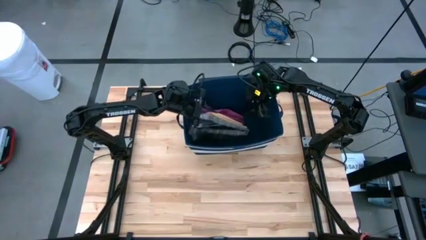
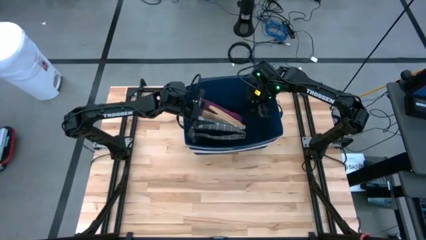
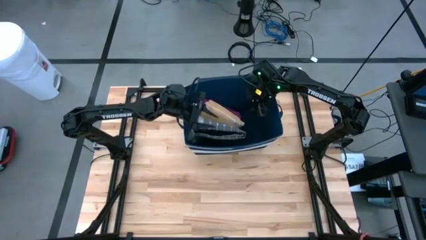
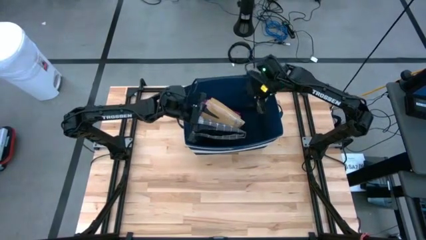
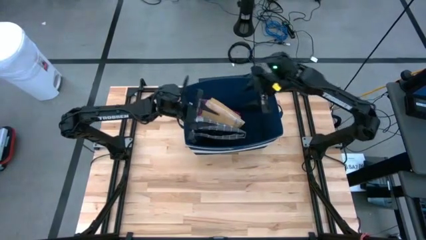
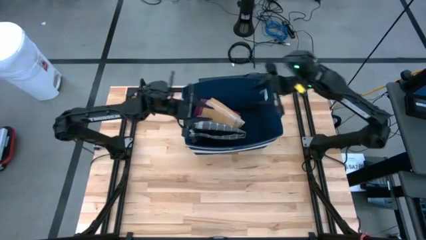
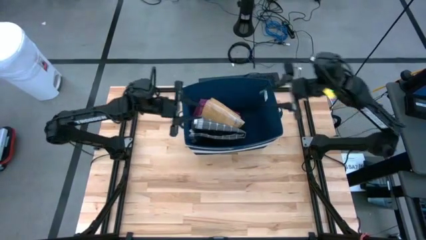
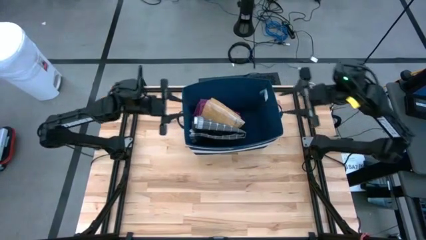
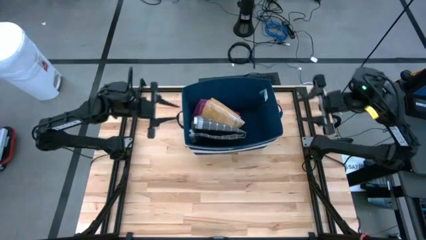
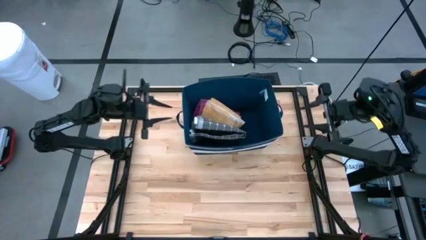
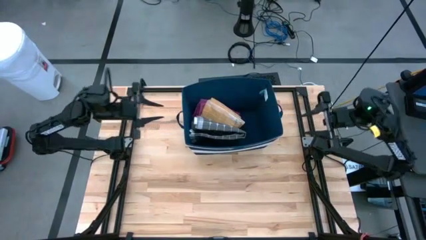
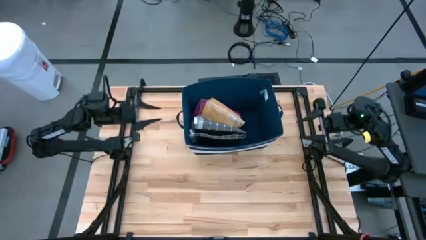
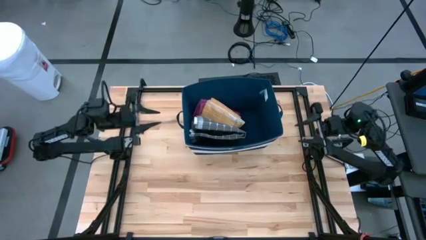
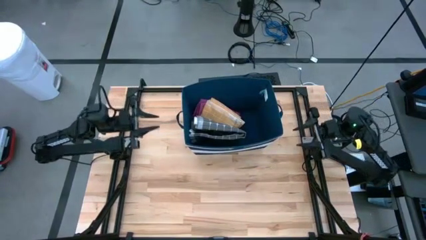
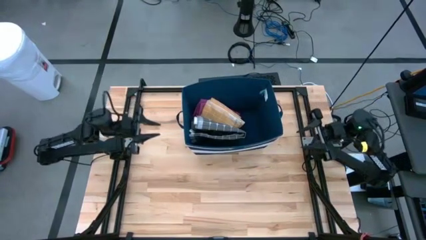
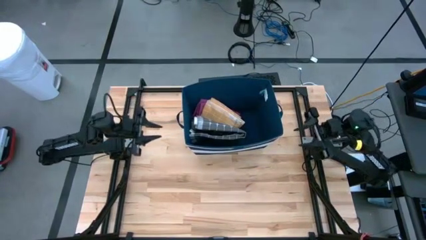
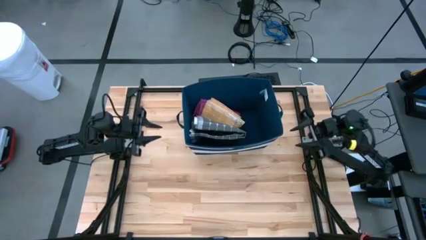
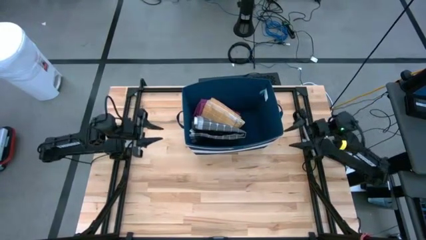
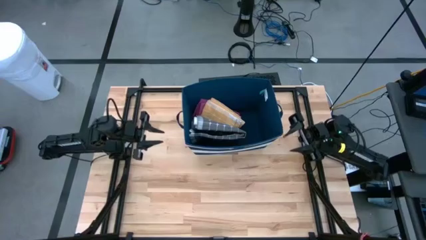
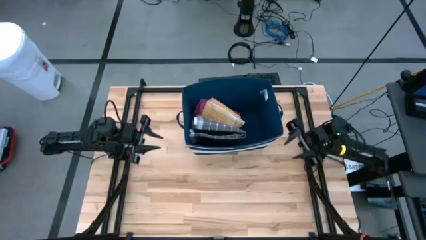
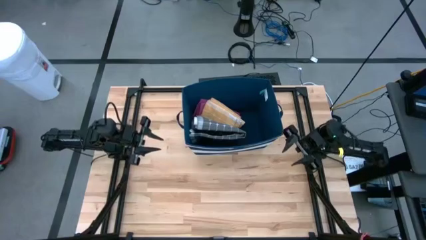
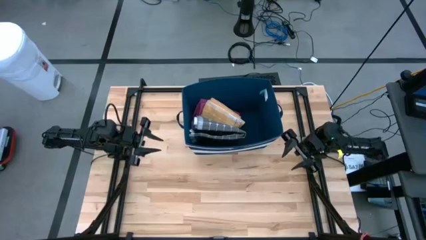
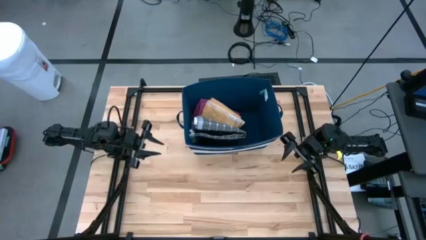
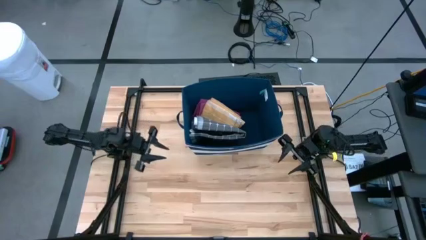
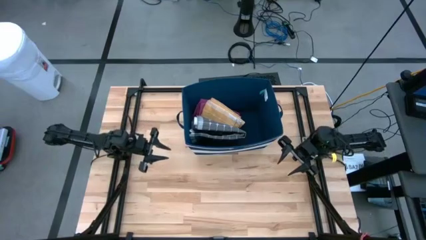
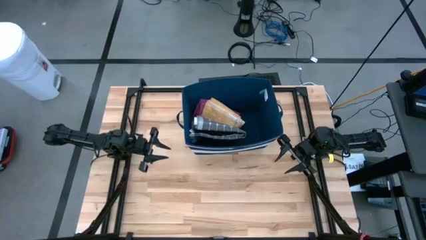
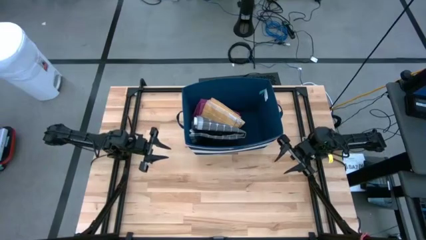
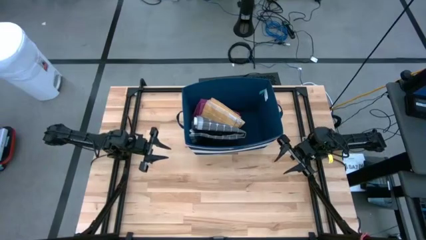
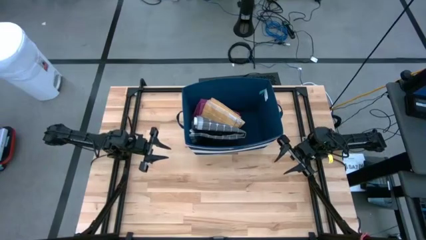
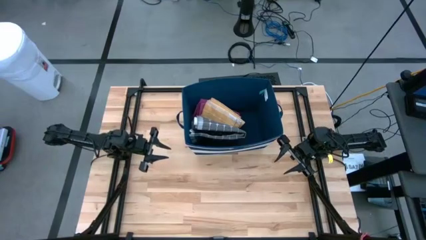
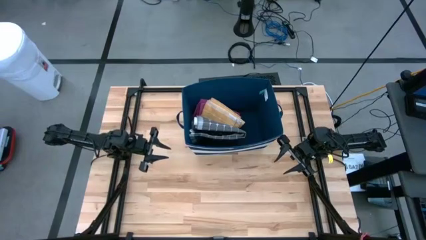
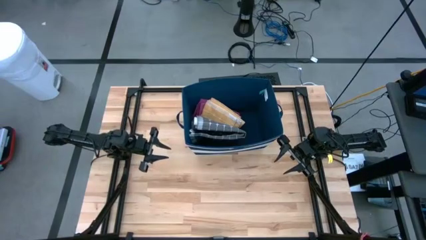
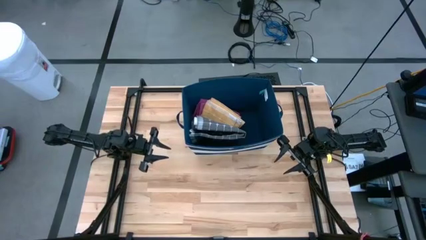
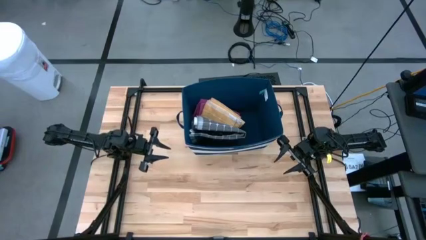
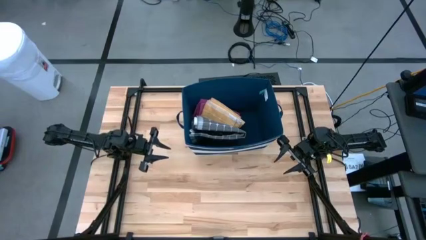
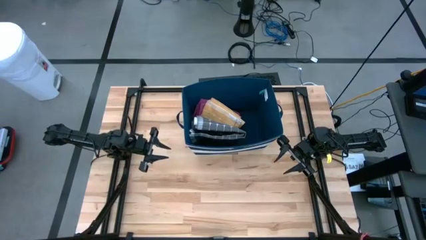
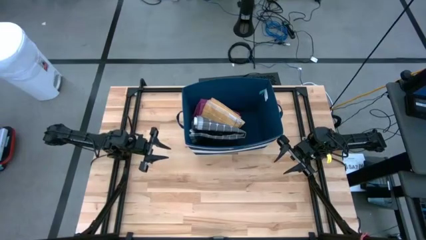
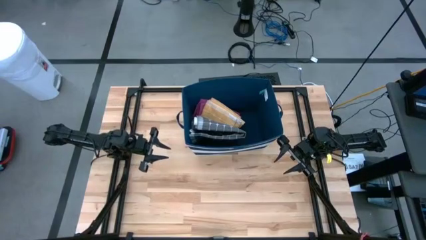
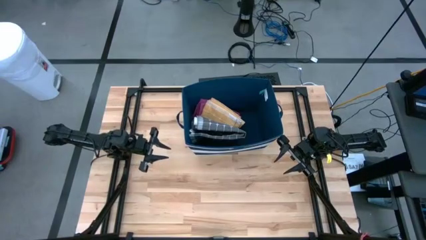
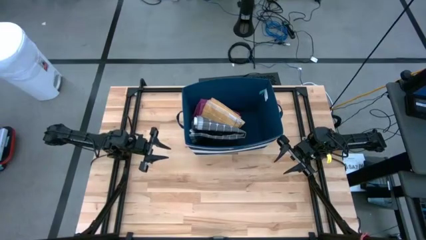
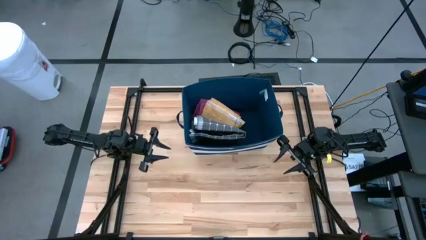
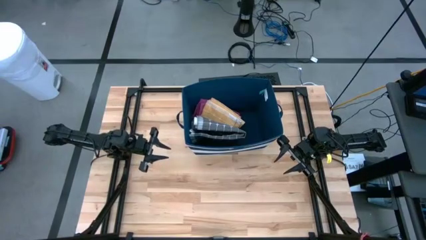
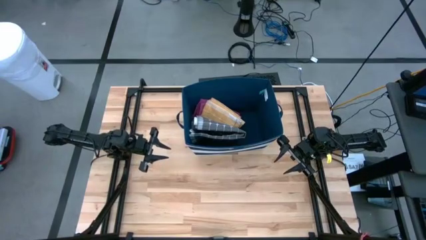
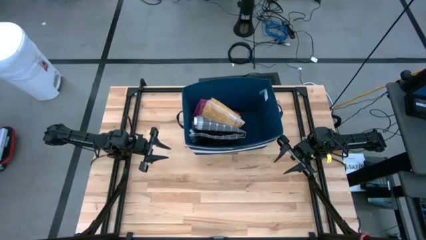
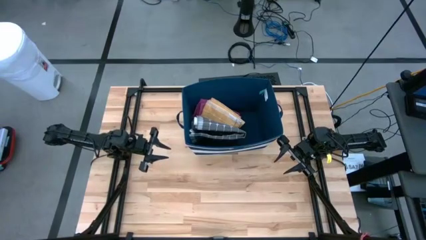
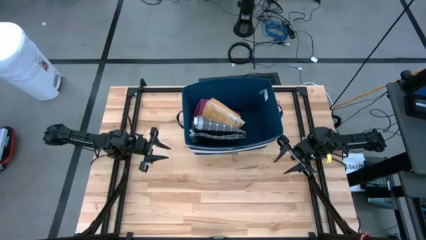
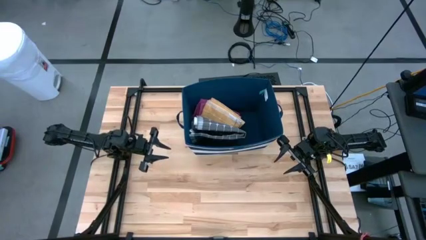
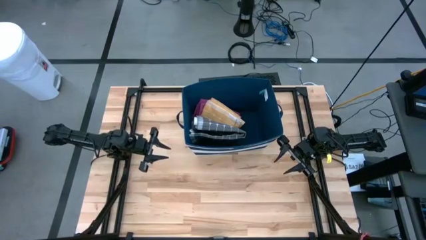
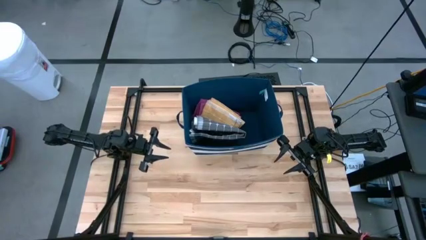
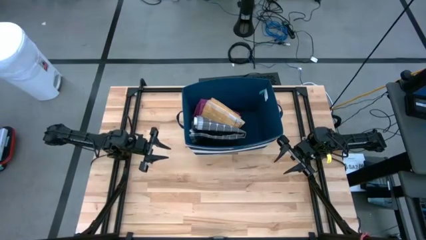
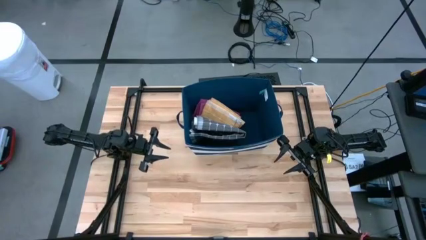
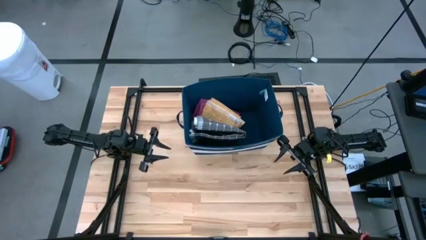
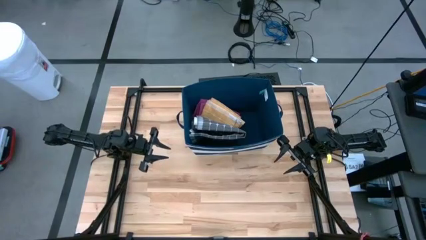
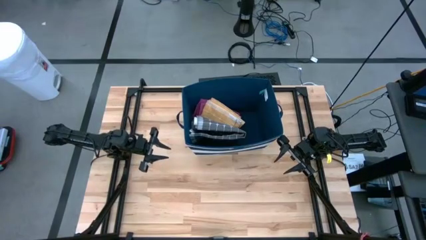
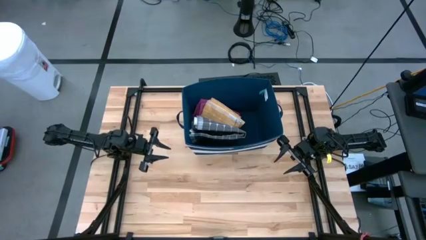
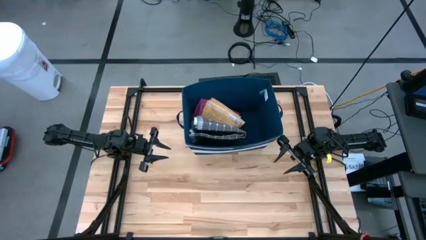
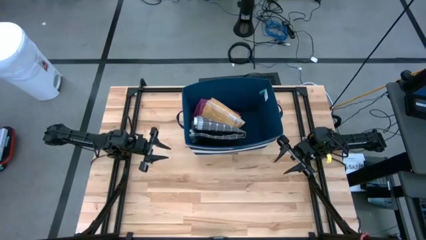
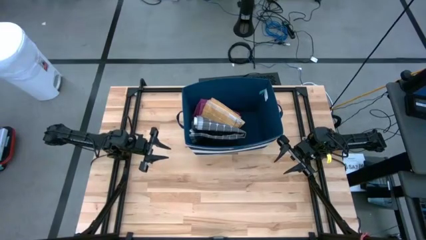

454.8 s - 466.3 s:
Task: Fold towel
Return to Home Position

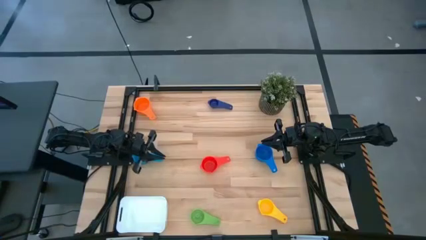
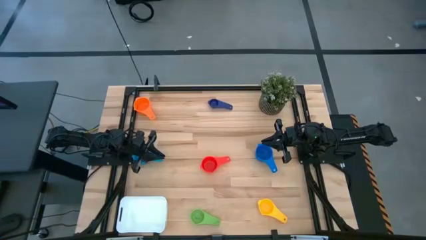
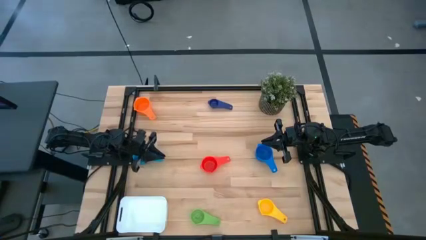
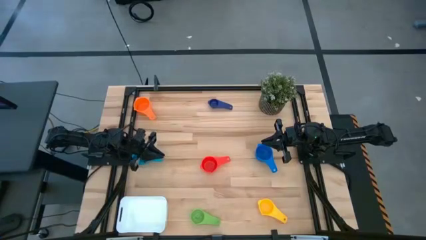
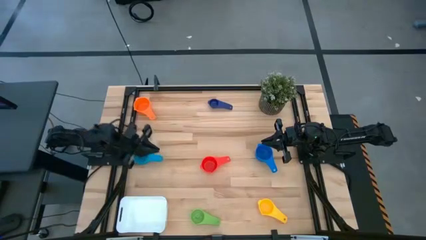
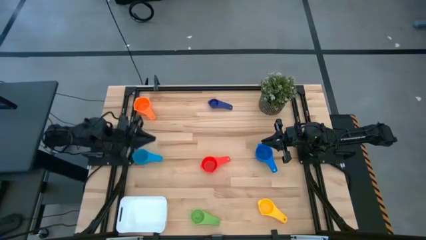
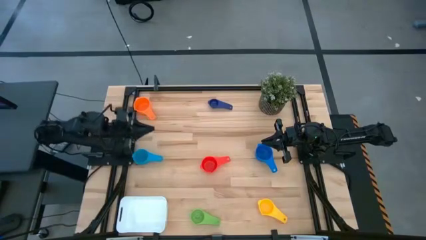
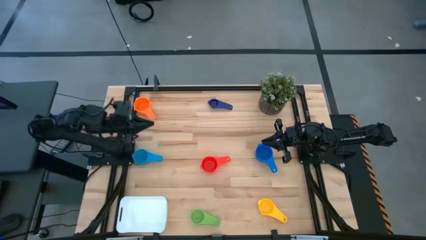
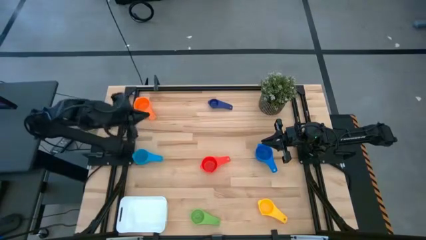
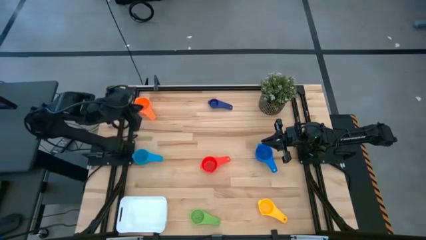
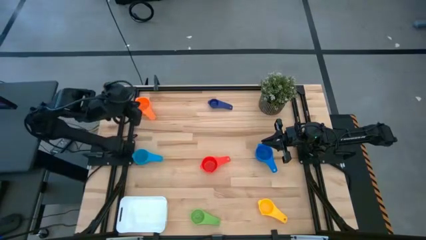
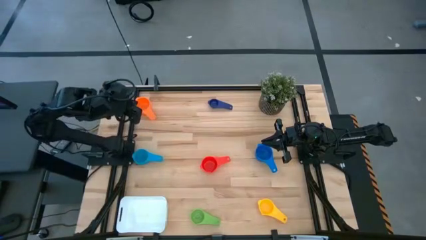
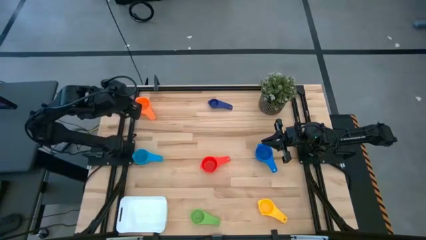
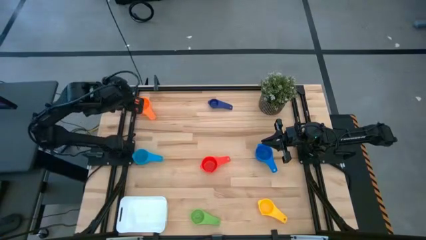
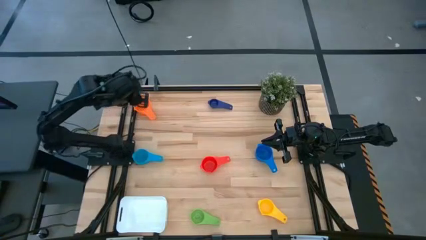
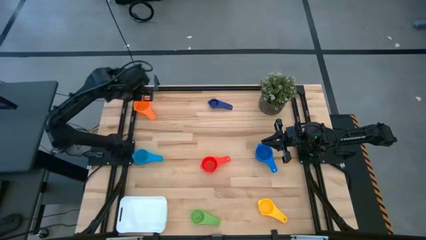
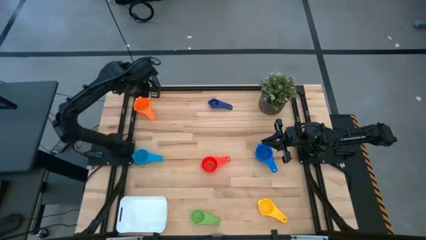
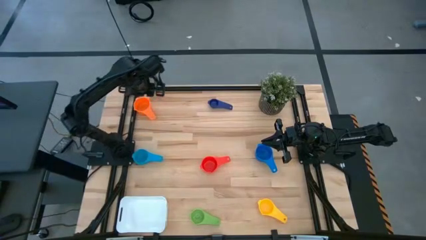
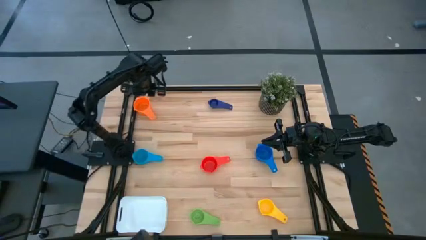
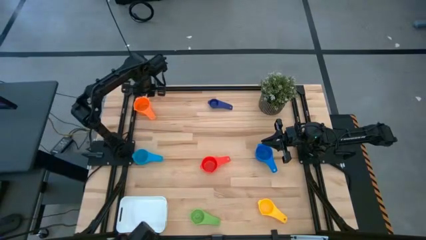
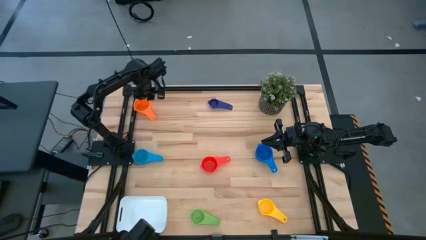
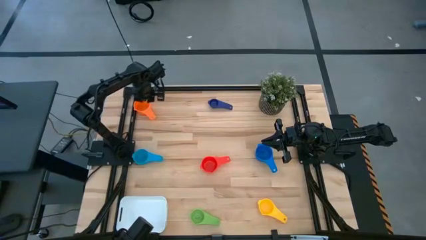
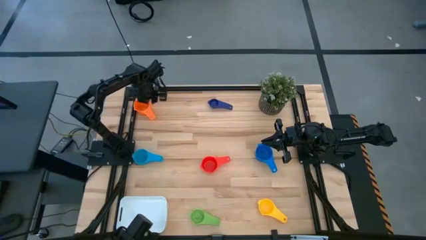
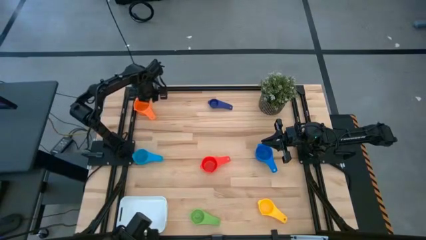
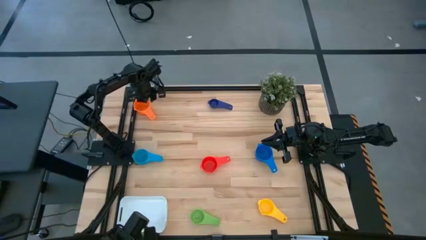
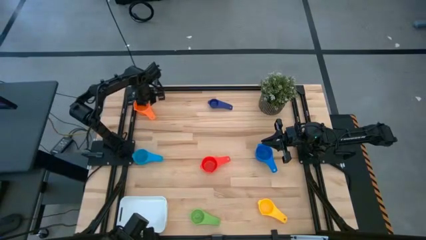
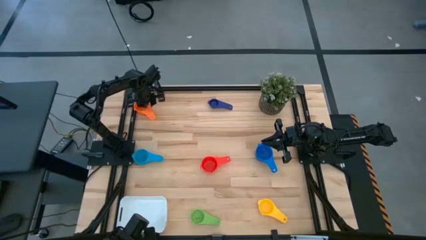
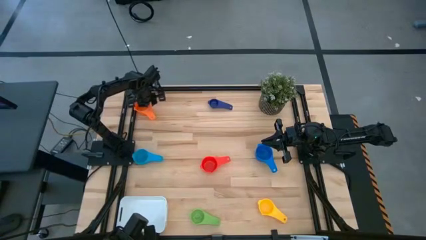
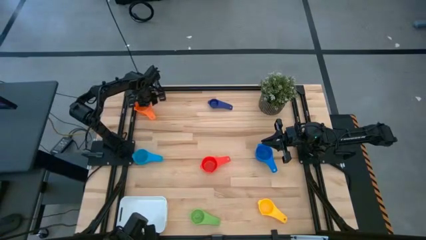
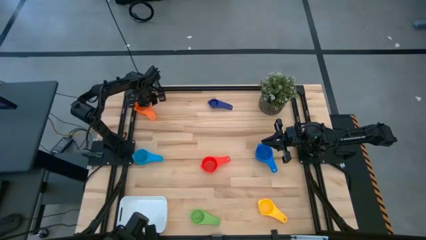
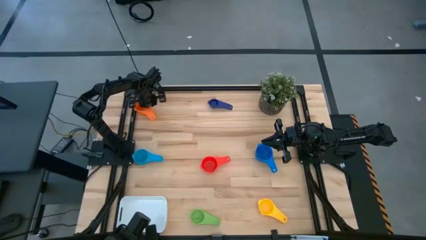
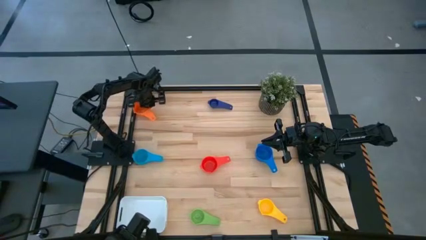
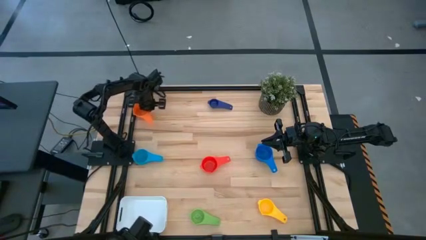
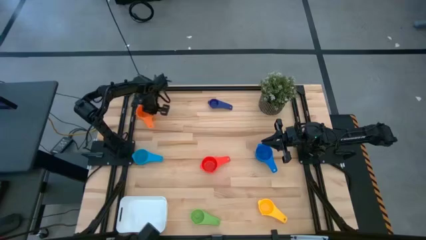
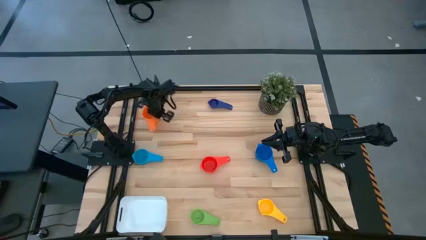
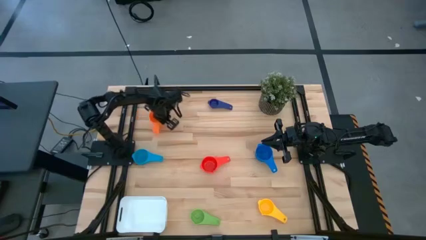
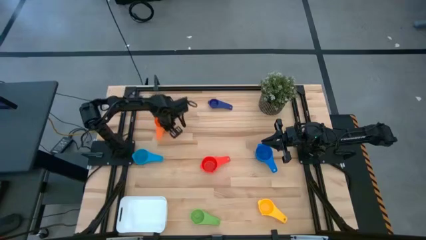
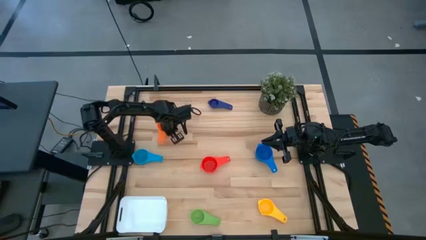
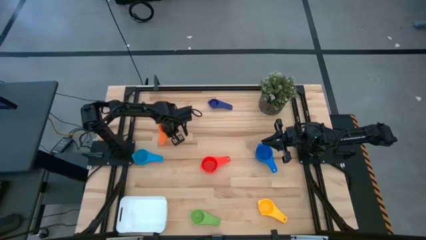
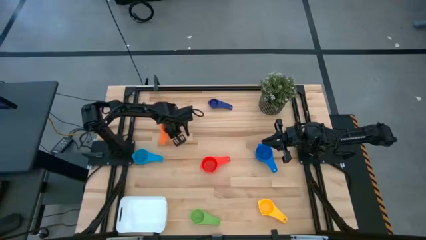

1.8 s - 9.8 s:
Task: Nest measuring cups in basket
Move the orange measuring cup to the top left of the table
